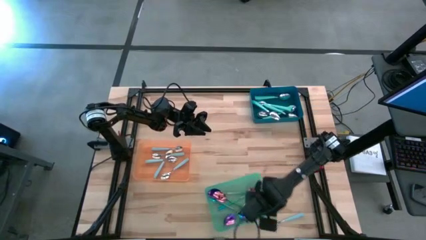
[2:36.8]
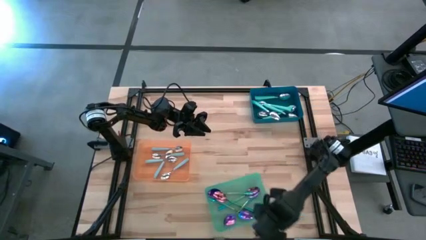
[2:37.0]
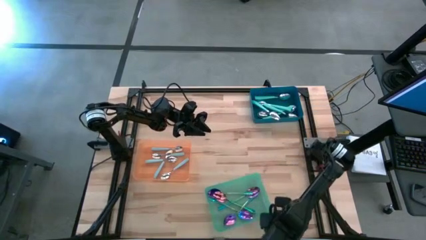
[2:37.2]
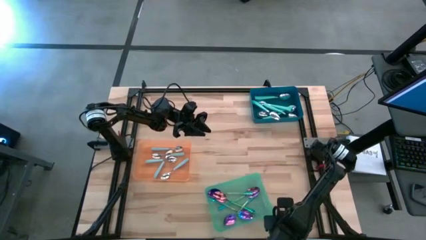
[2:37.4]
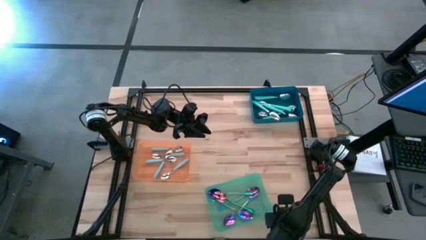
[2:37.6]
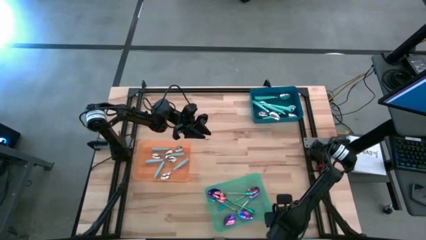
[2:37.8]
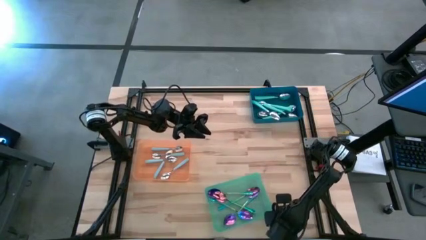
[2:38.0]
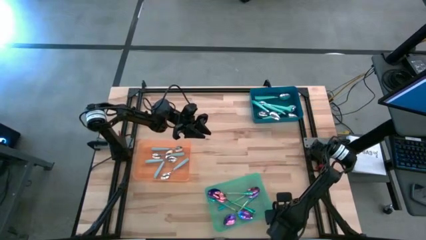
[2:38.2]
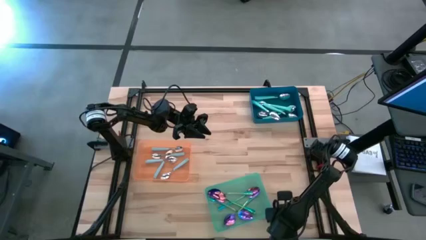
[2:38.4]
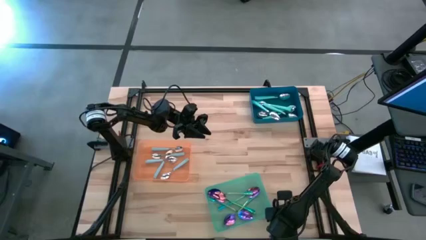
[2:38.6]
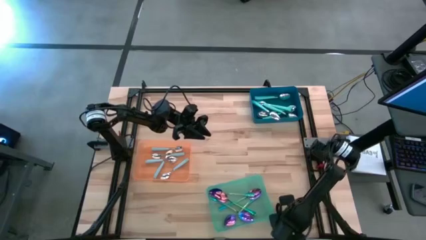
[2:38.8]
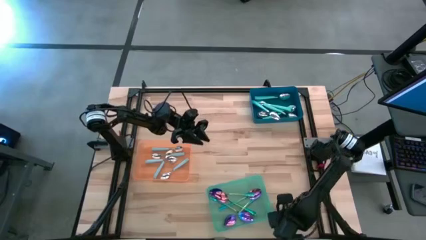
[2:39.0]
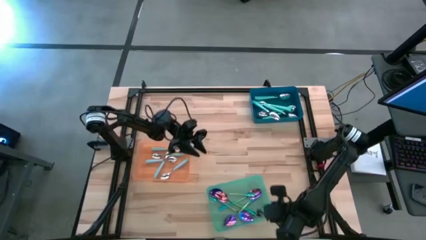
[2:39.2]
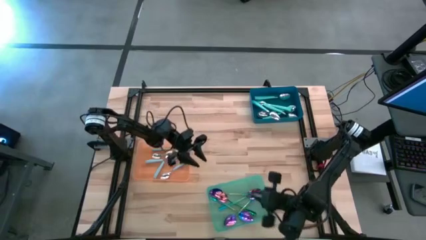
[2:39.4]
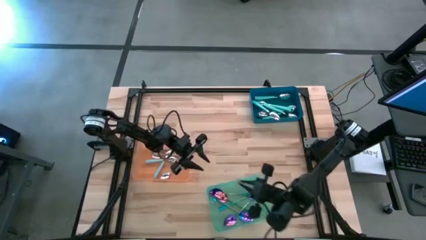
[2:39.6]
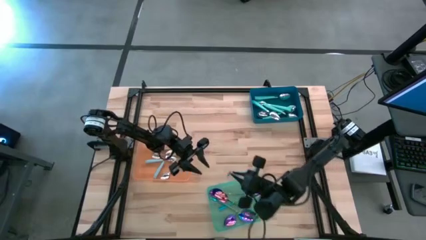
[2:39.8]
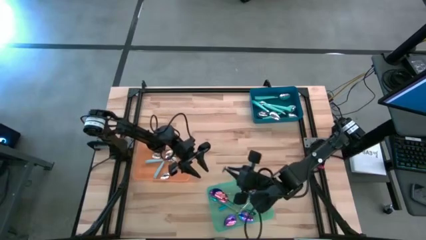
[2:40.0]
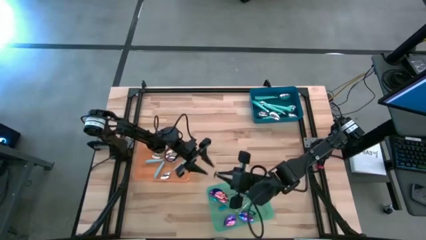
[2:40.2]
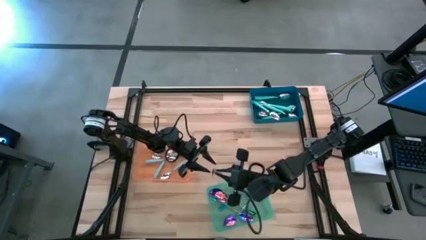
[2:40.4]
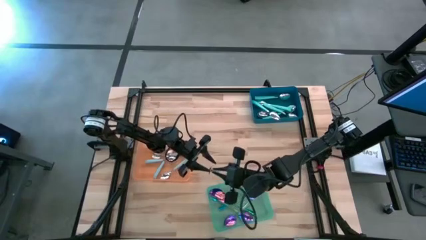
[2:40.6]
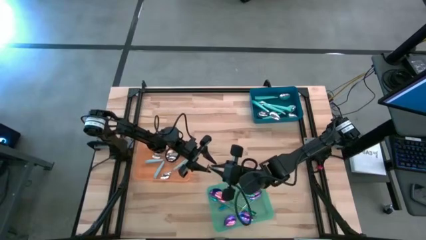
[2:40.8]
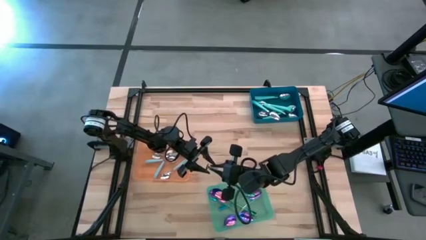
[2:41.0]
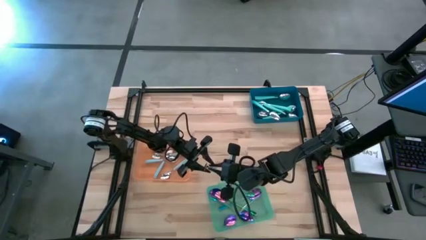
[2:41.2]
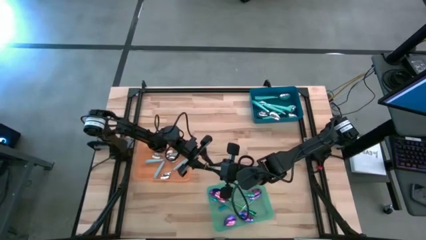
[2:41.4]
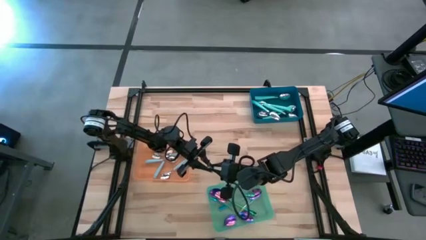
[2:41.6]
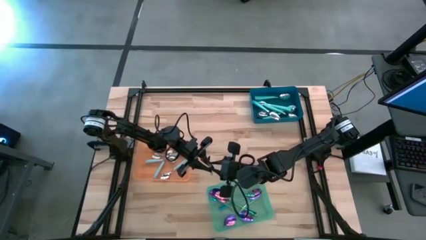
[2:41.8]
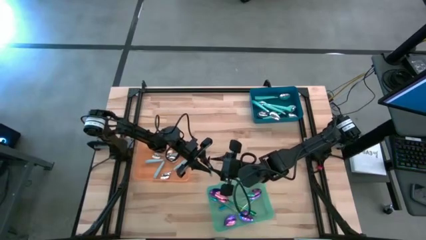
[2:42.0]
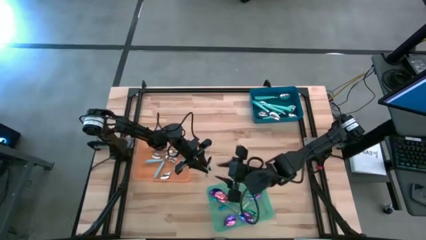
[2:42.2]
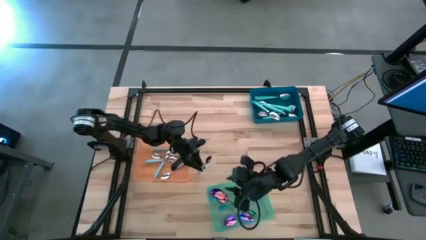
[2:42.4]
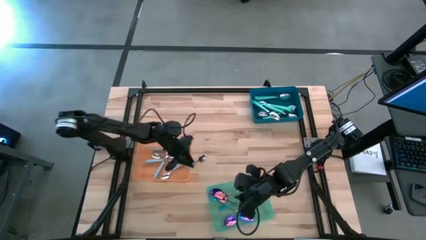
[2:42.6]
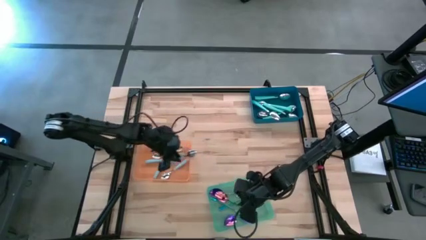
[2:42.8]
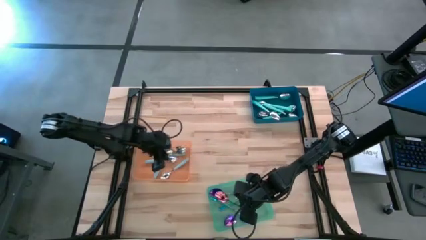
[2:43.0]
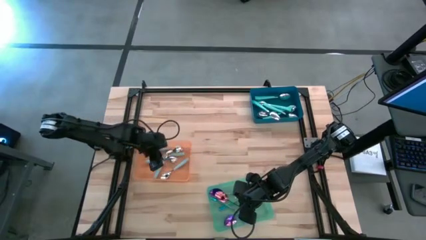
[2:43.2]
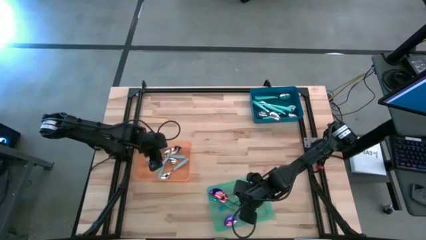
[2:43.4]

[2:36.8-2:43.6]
Task: Sort silverware by color (type)
Put the blue spoon into the orange bin

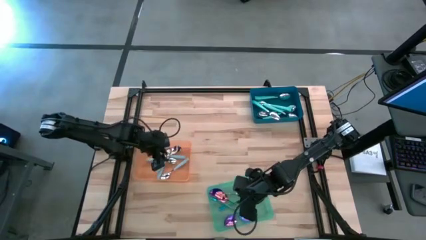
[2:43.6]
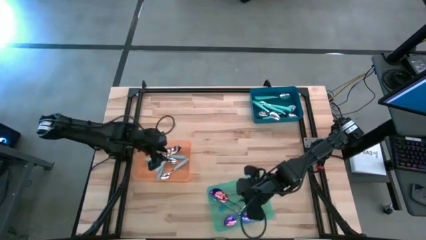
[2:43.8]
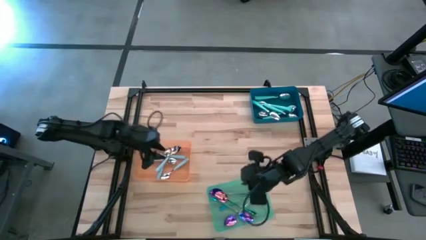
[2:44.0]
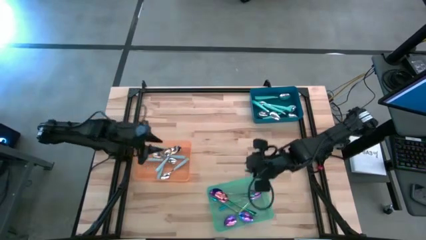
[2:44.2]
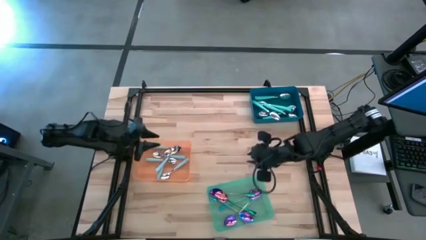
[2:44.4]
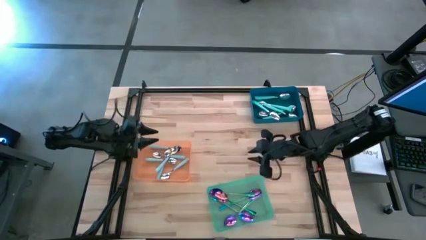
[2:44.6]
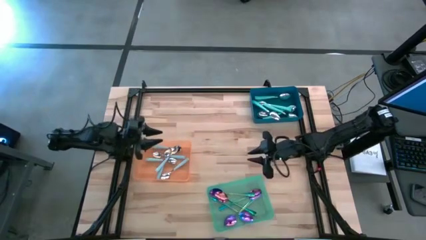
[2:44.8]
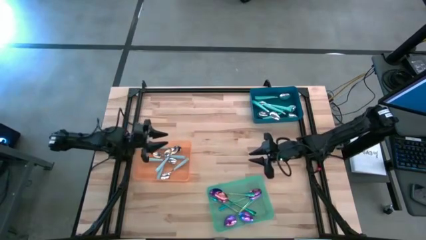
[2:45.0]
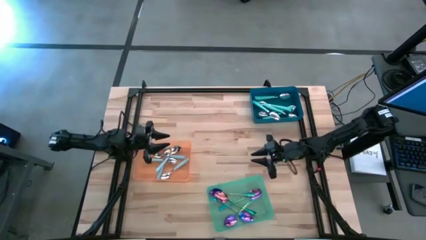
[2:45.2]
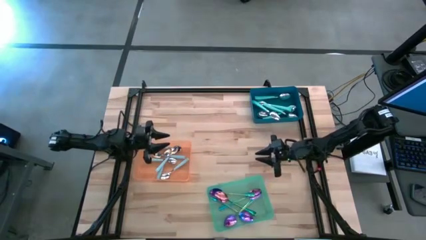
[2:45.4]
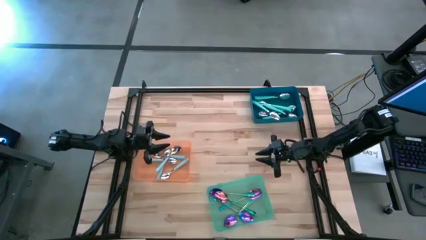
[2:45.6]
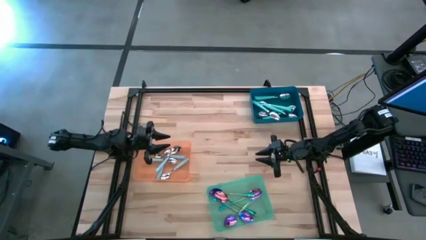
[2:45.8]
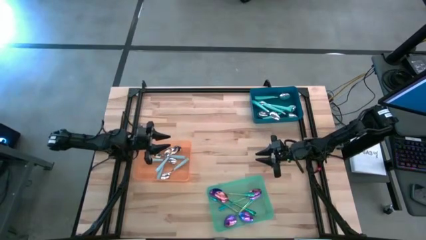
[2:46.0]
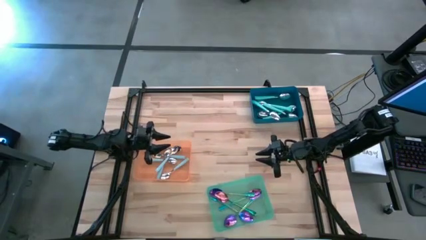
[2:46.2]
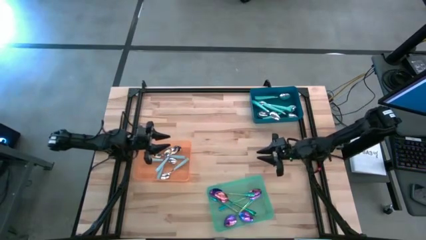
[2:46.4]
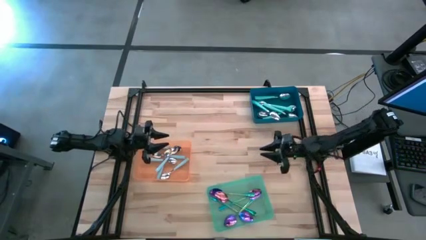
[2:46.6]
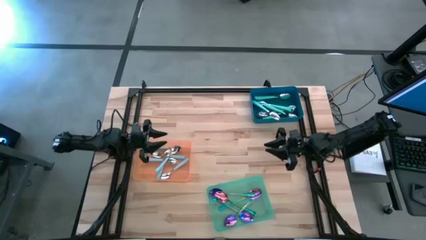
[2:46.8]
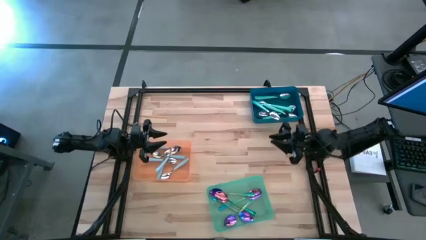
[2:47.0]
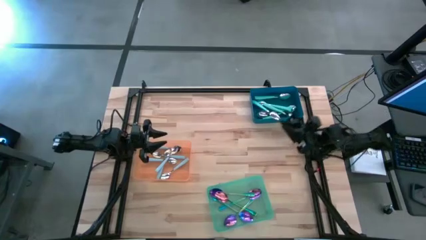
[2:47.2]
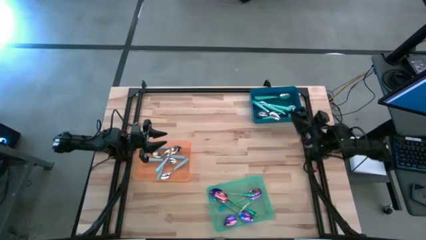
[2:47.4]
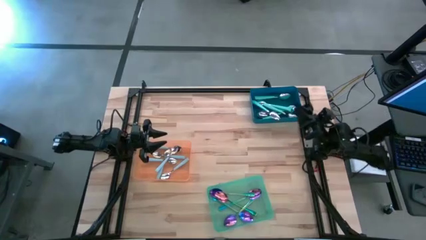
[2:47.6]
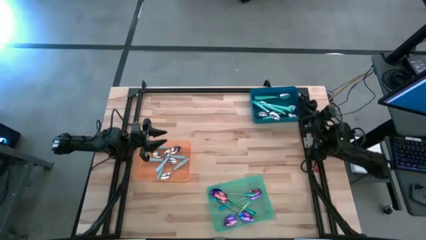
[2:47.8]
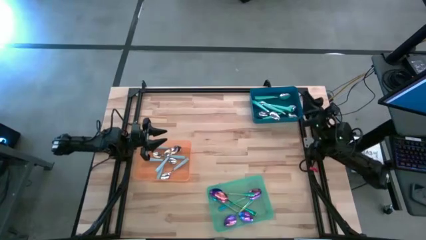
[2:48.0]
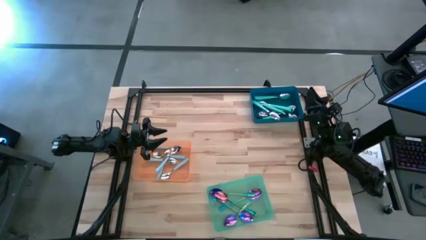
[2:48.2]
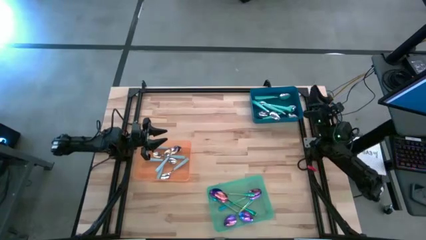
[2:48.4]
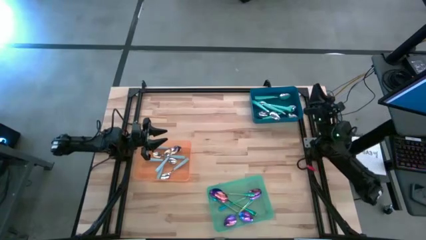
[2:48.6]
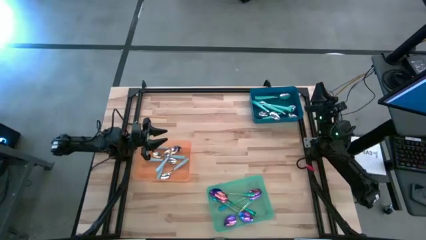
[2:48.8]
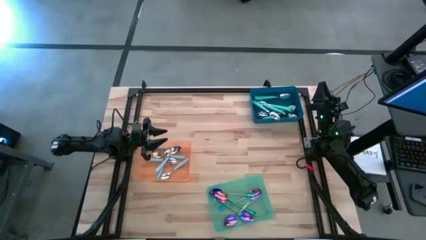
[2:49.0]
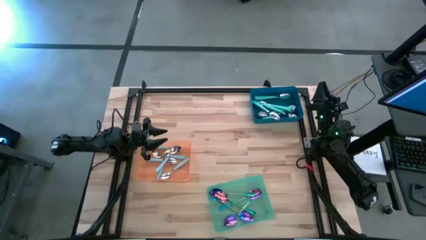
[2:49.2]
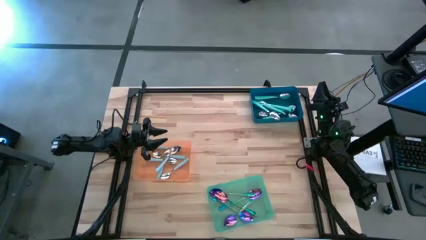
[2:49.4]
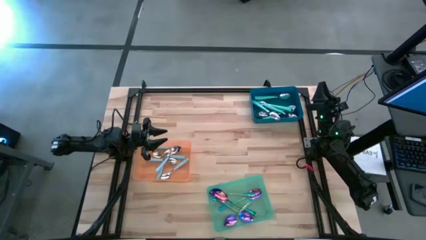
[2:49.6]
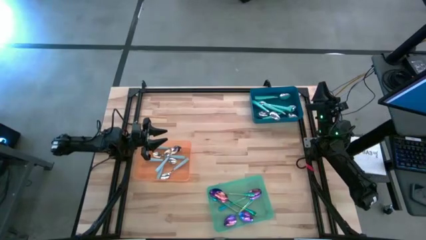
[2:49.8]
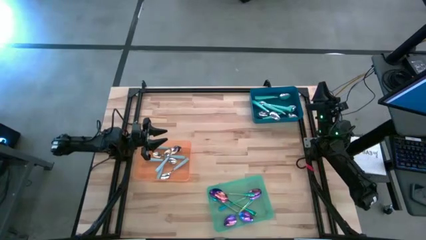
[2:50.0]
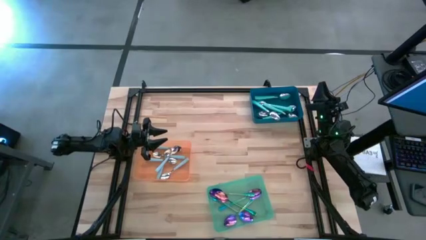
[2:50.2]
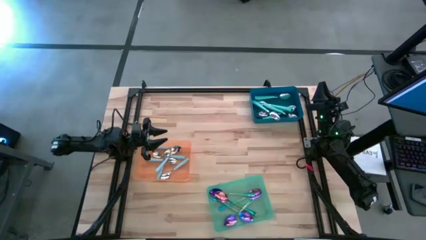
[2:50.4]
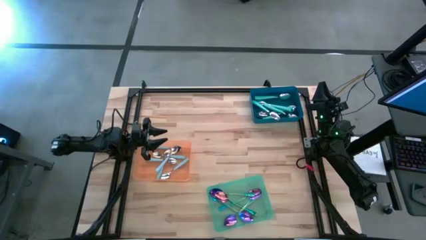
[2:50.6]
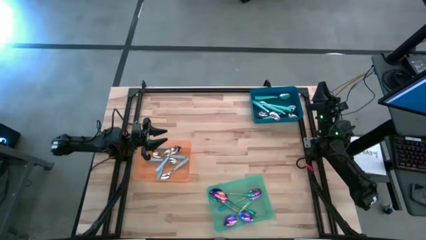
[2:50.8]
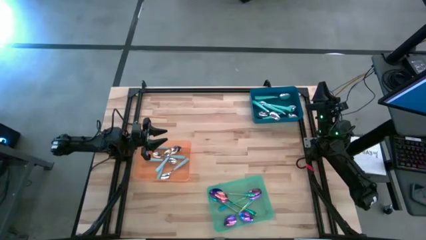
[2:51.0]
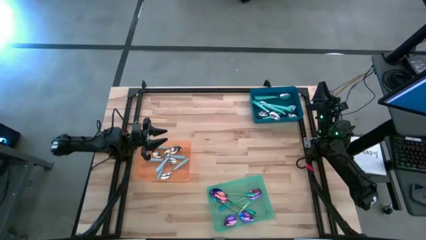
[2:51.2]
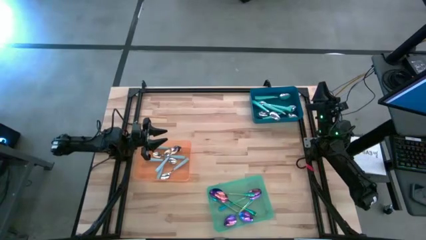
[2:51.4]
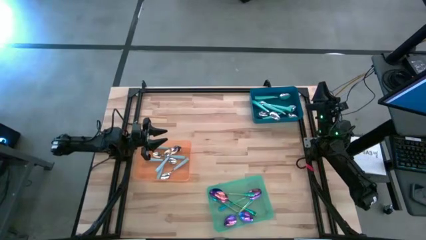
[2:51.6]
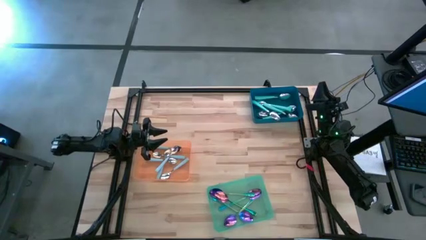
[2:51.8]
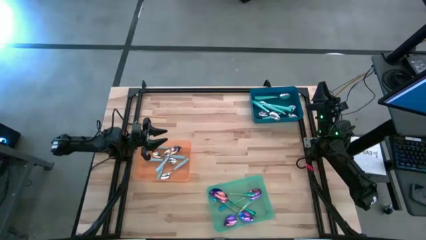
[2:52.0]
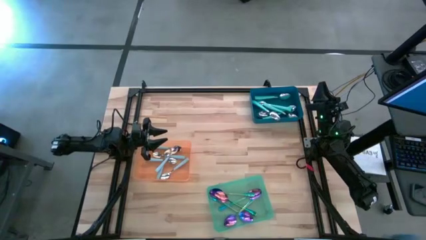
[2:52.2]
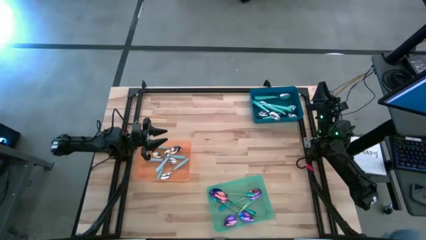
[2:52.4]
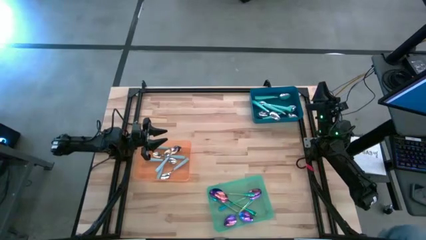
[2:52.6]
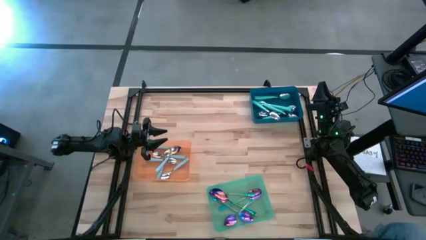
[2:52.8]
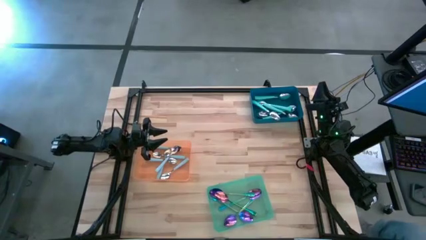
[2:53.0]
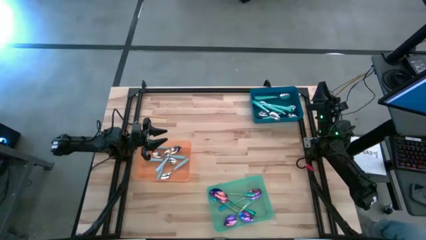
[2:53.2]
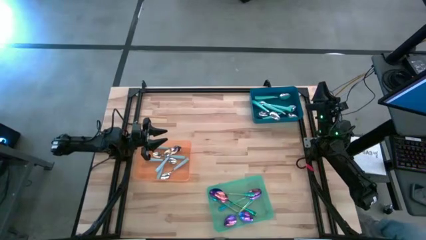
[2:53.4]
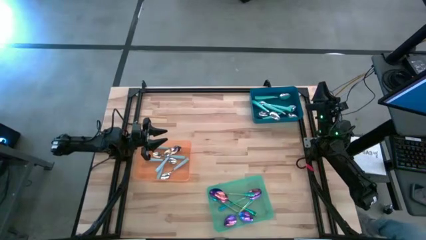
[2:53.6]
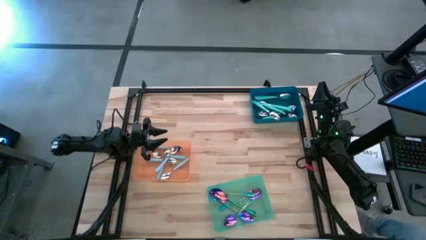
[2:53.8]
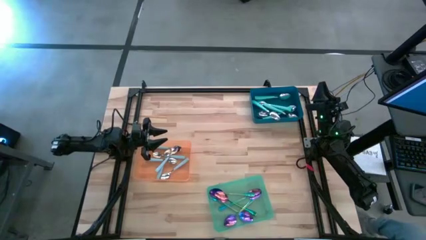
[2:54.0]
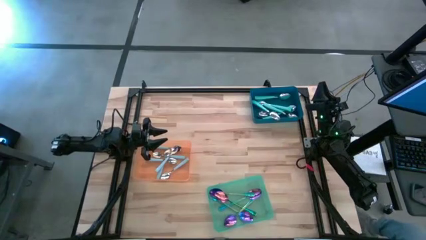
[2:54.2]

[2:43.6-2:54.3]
Return to Home Position
